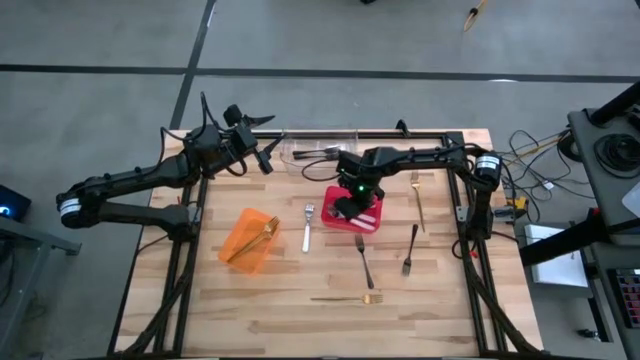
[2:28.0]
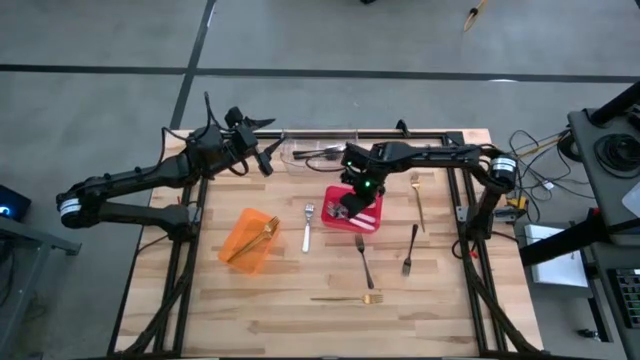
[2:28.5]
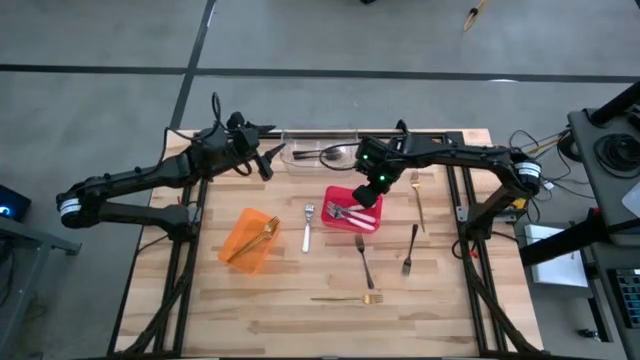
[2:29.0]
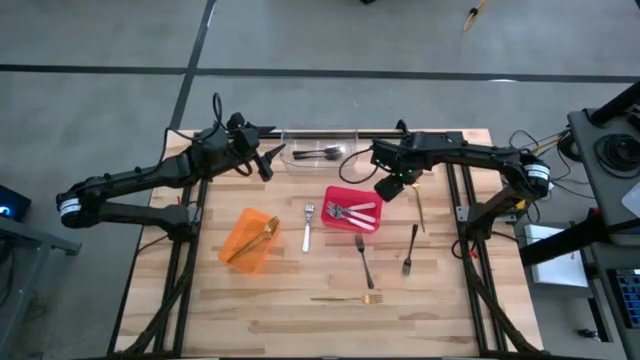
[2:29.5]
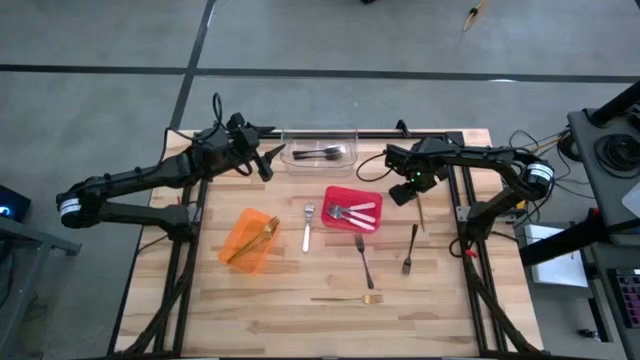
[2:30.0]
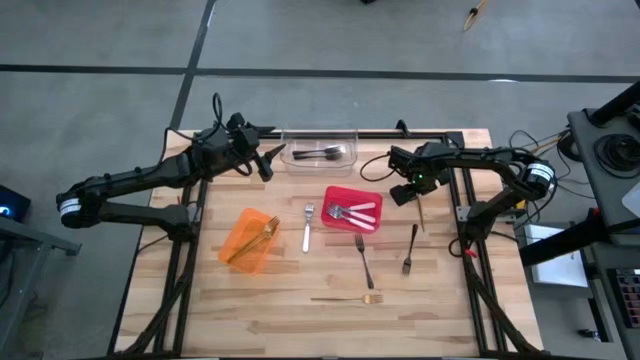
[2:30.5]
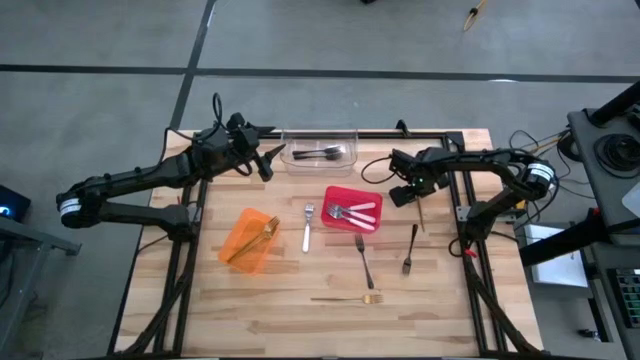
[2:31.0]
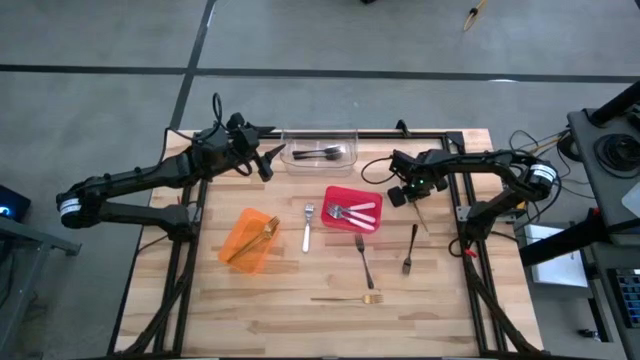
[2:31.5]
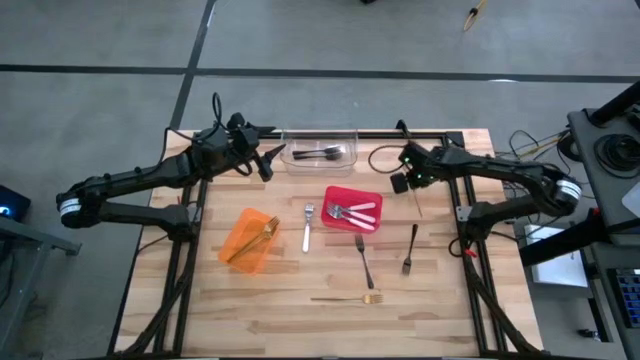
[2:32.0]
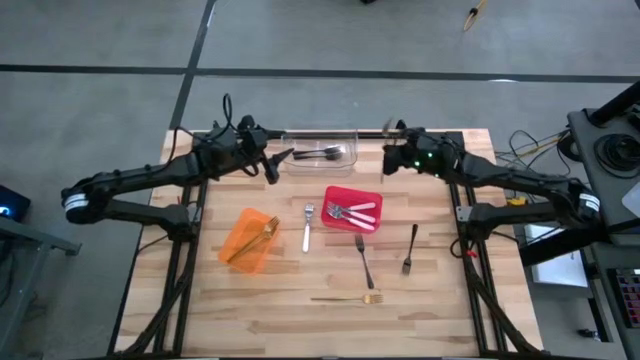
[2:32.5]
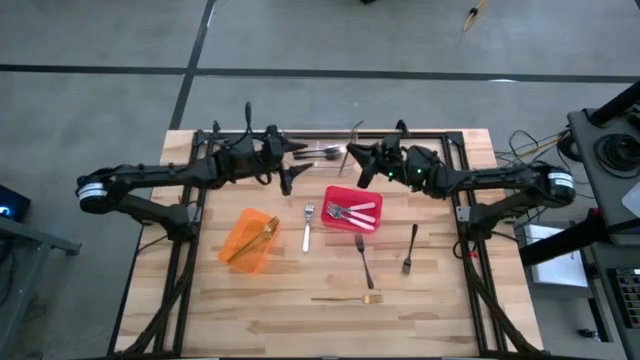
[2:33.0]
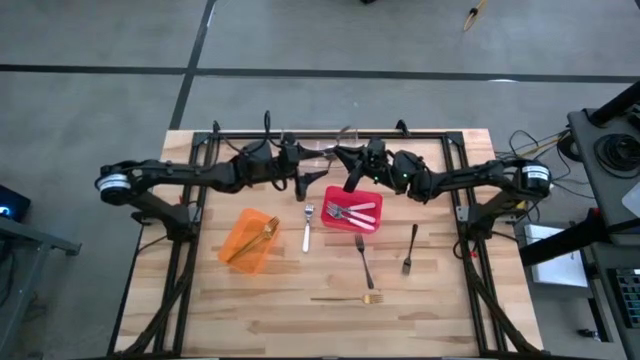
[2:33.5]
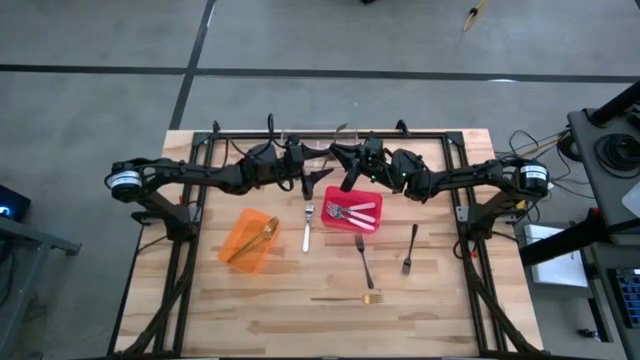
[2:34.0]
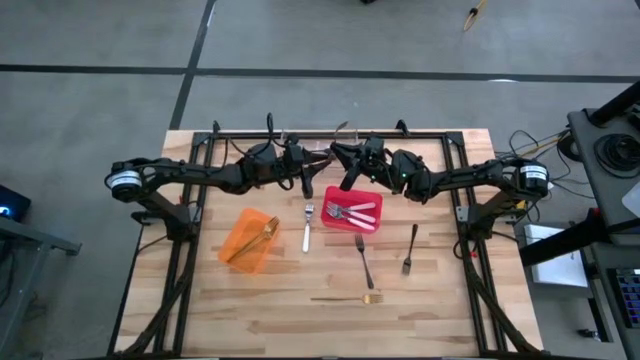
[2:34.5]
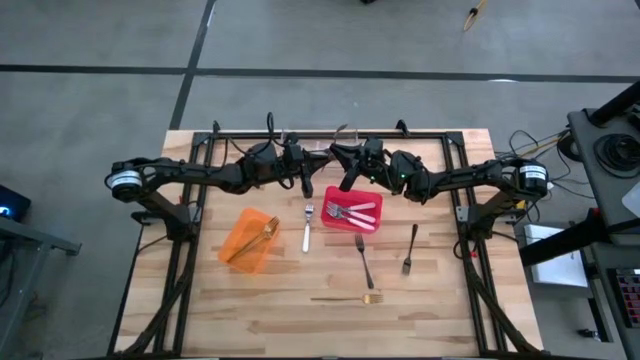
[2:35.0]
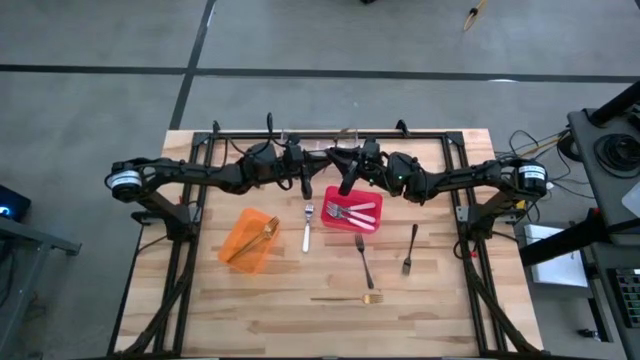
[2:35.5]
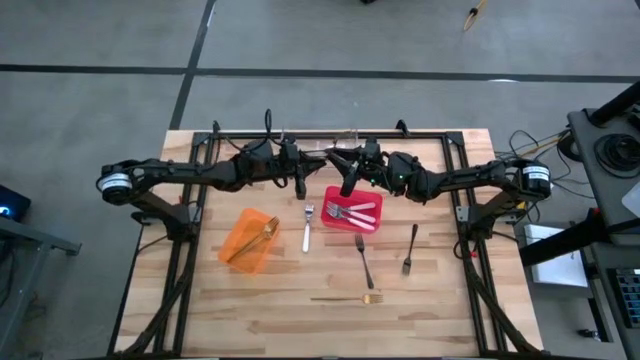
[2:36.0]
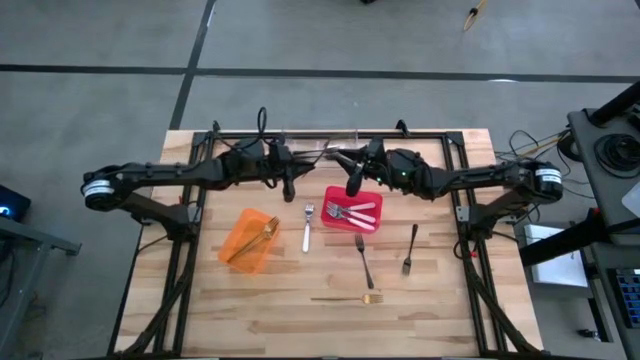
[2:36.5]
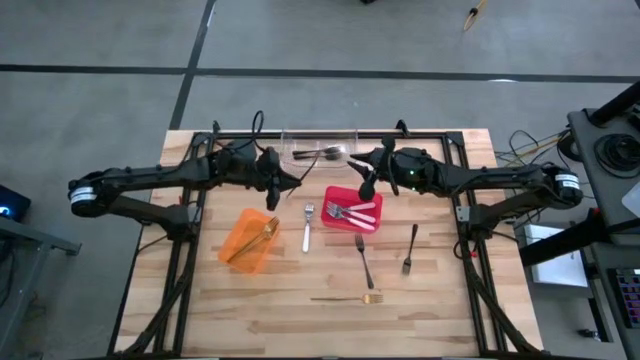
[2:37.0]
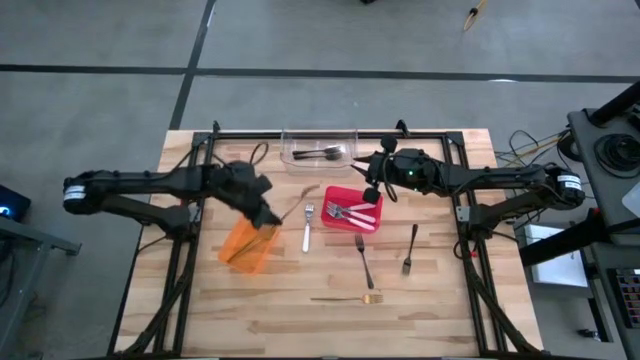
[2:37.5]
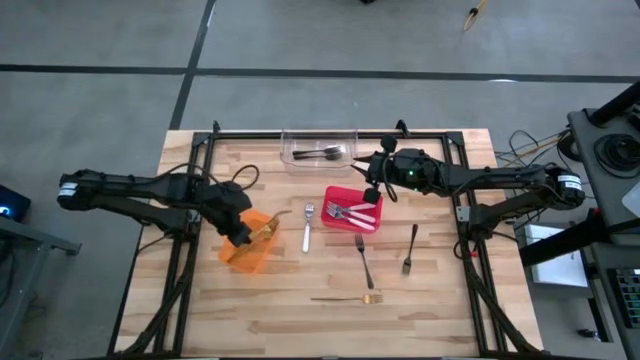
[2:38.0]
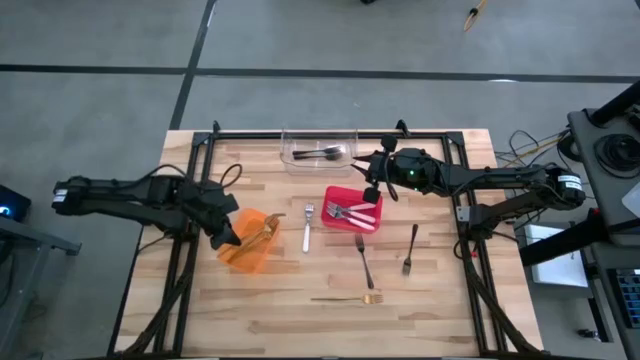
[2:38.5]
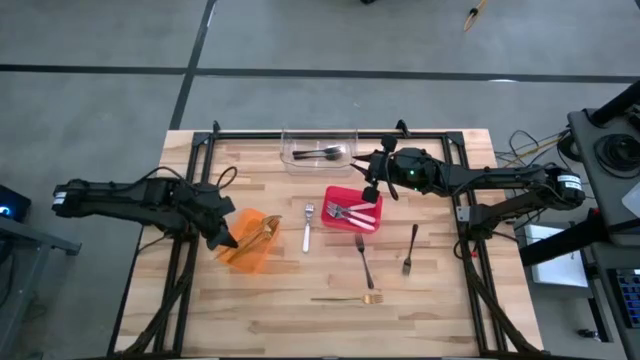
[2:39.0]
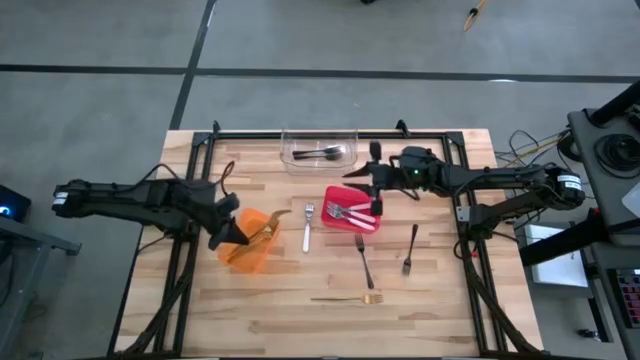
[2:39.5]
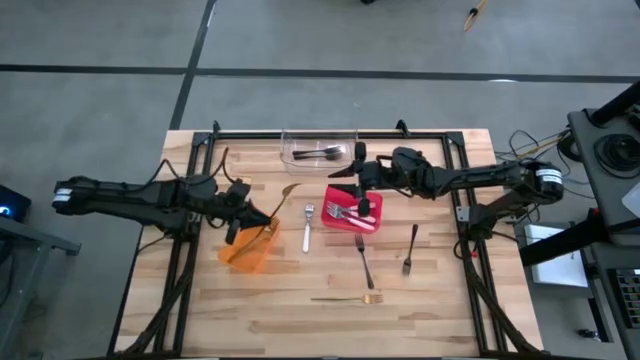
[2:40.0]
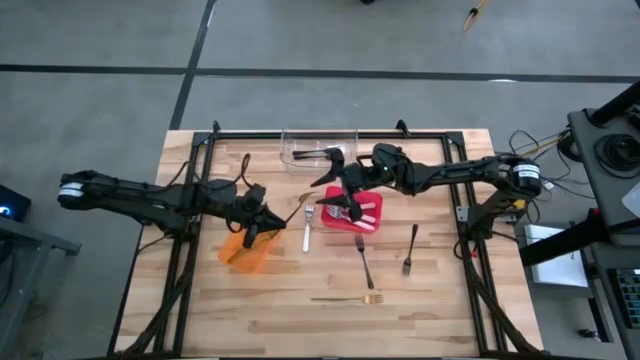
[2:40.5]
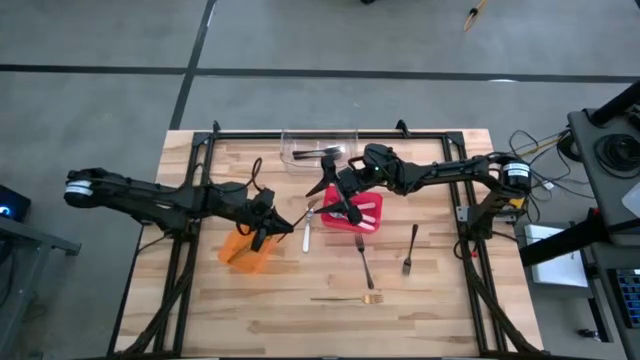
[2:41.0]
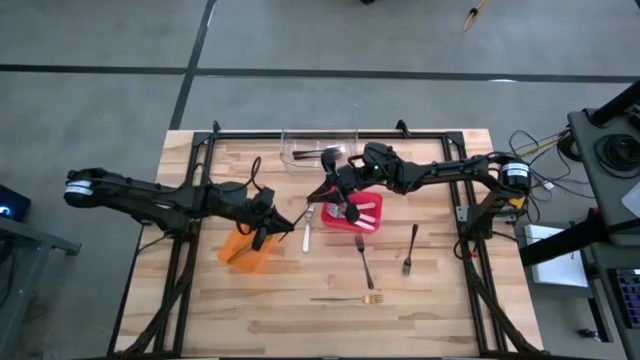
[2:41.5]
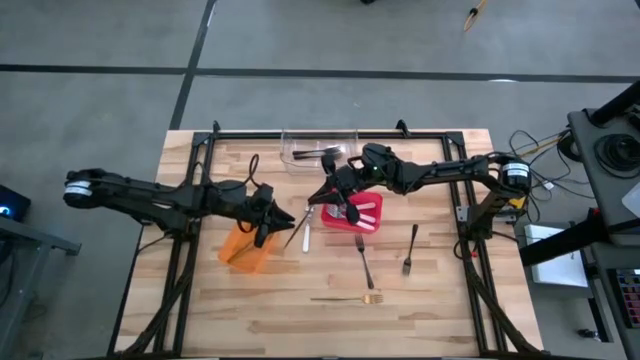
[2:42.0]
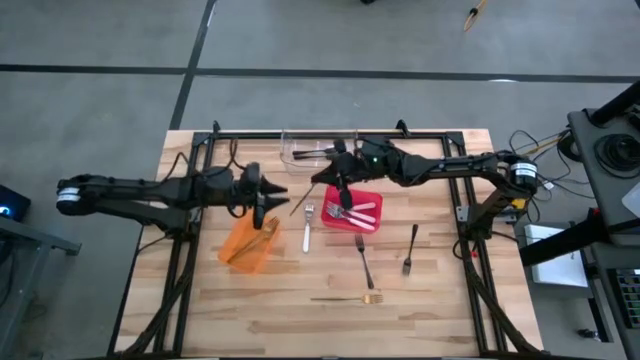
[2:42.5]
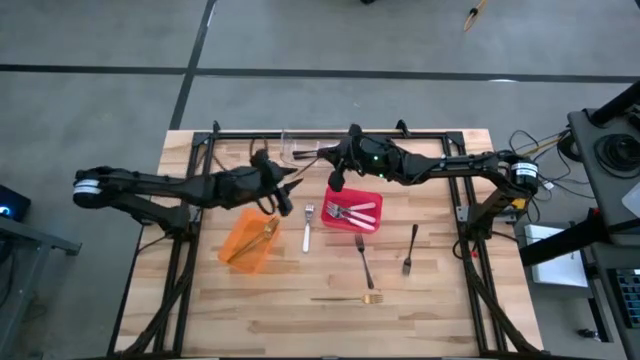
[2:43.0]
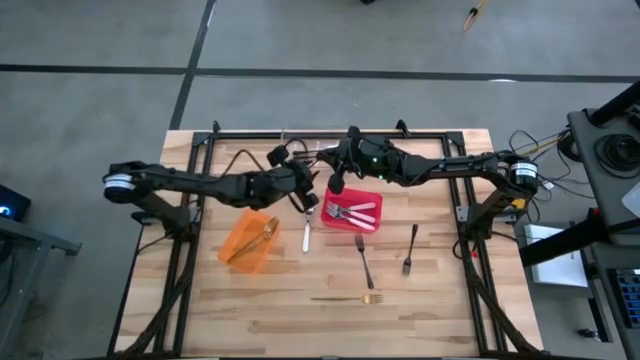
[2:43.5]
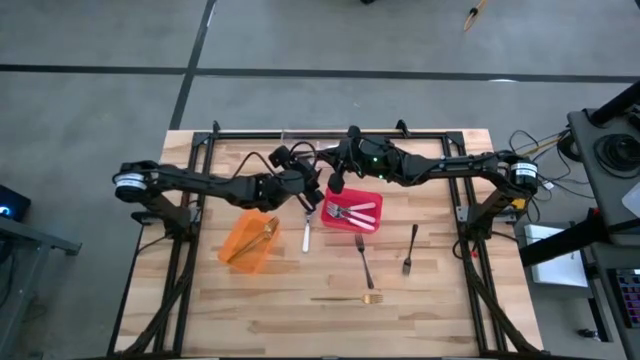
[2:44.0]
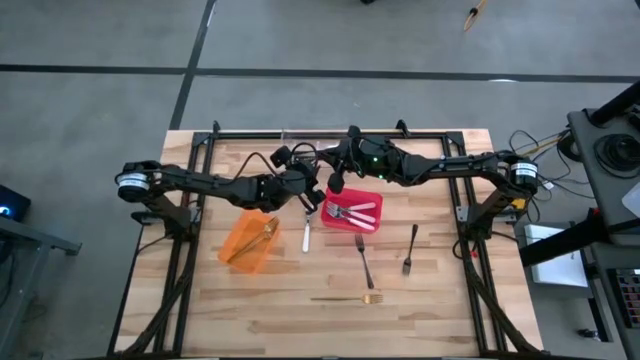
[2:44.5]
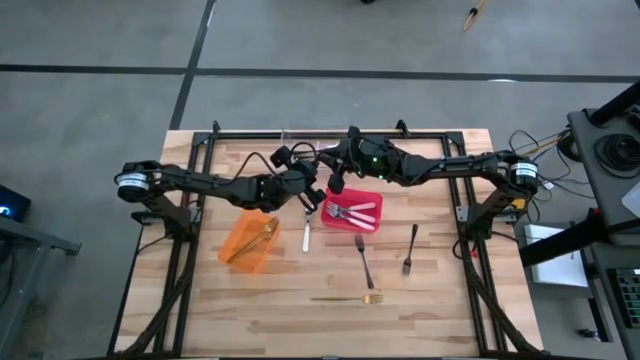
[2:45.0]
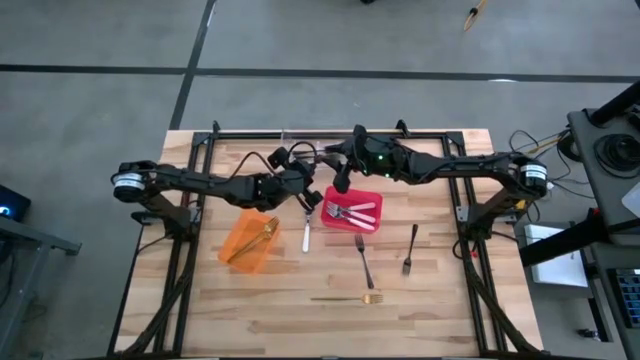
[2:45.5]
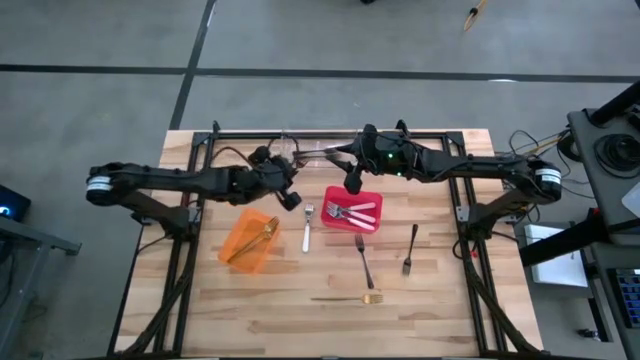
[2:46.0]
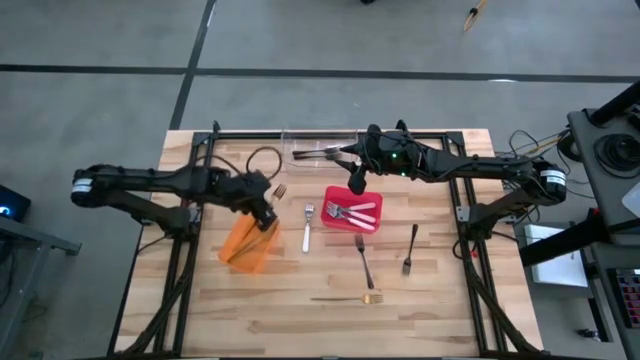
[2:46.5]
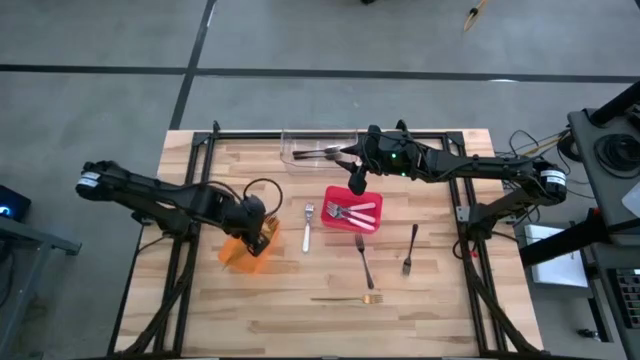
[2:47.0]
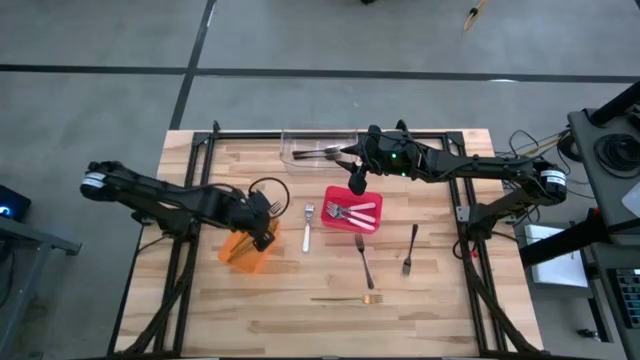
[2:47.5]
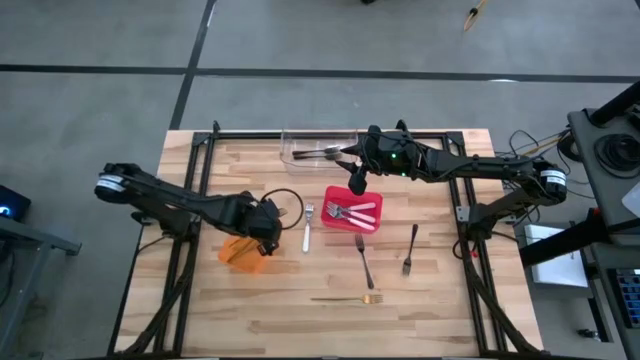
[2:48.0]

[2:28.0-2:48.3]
Task: Sort silverware by color (type)
Put the gold fork into the orange bin
